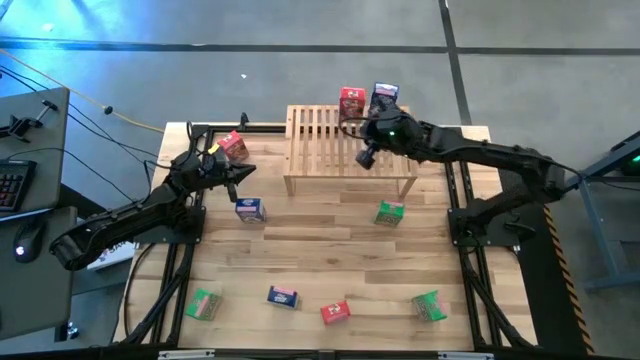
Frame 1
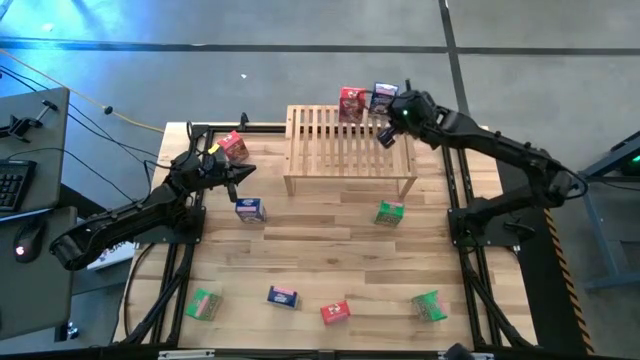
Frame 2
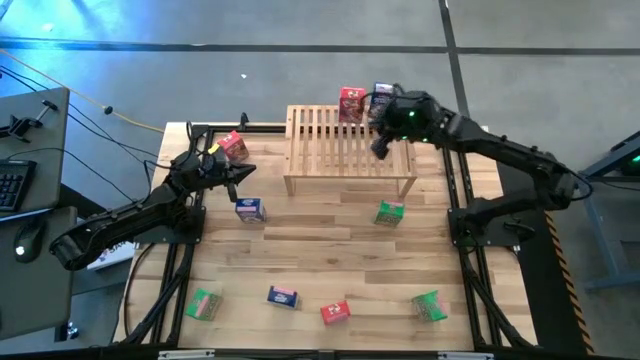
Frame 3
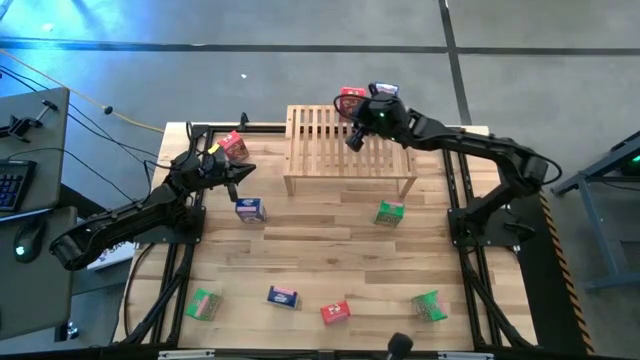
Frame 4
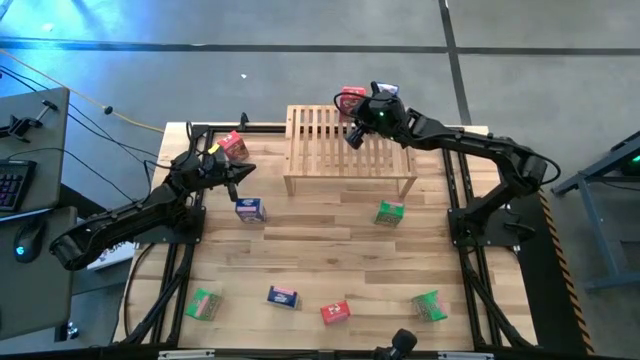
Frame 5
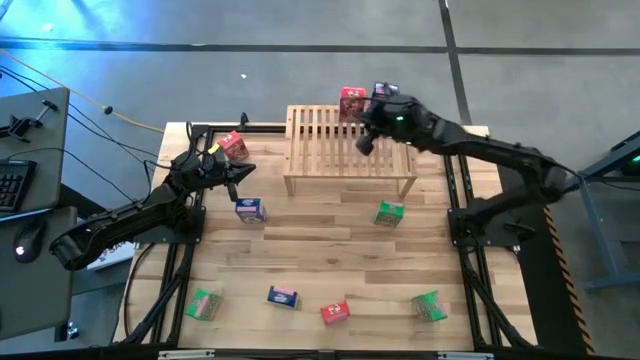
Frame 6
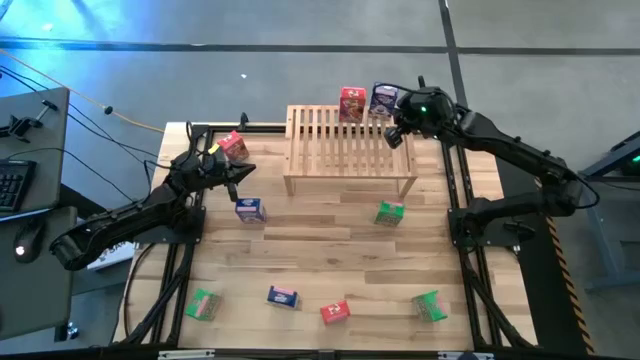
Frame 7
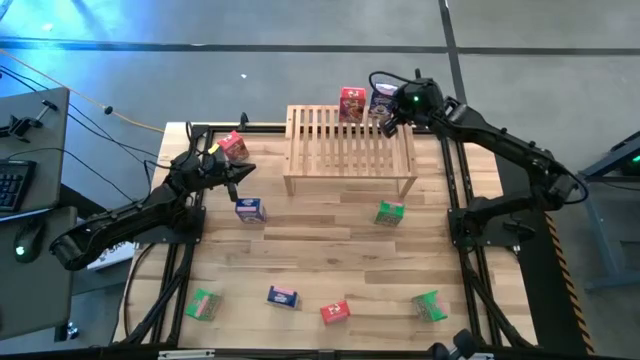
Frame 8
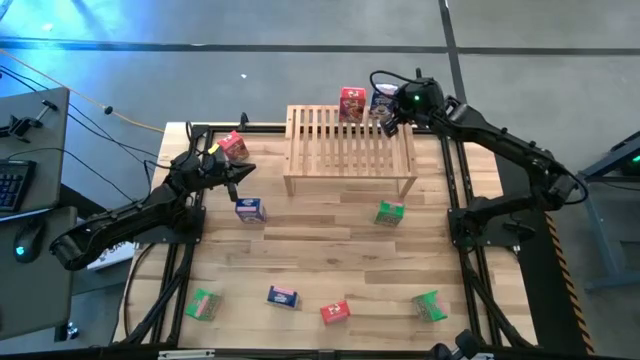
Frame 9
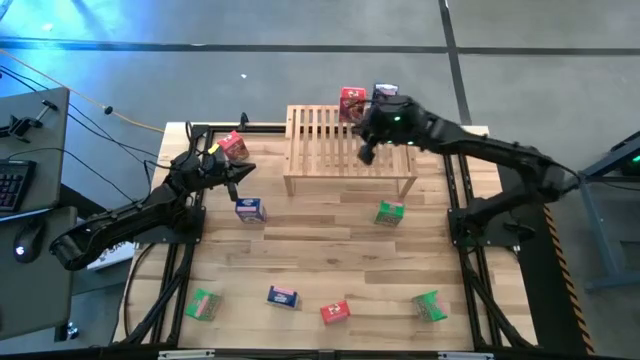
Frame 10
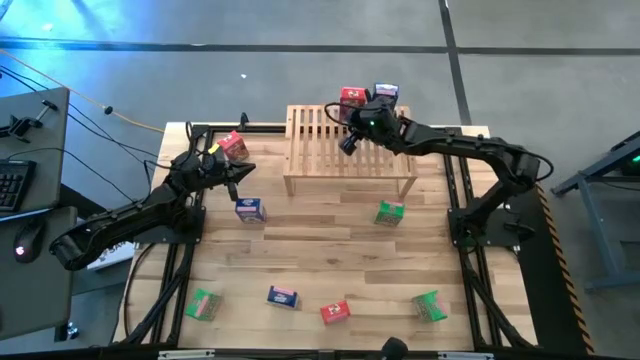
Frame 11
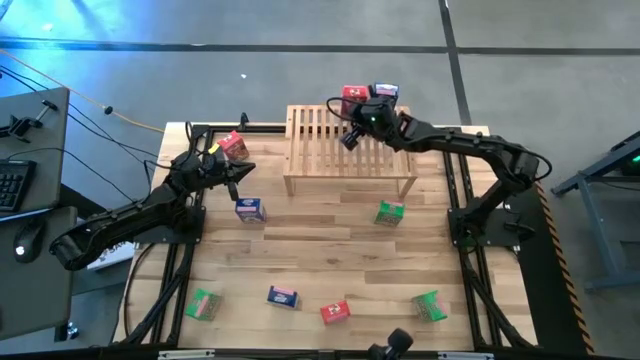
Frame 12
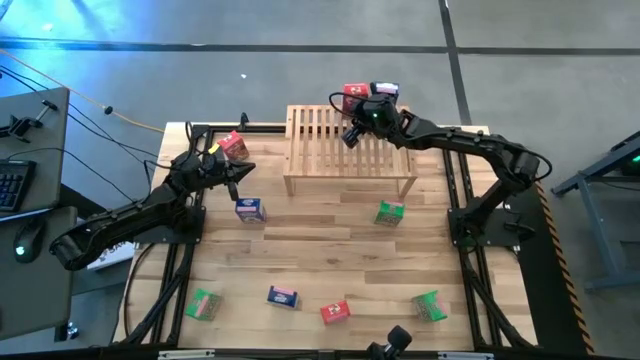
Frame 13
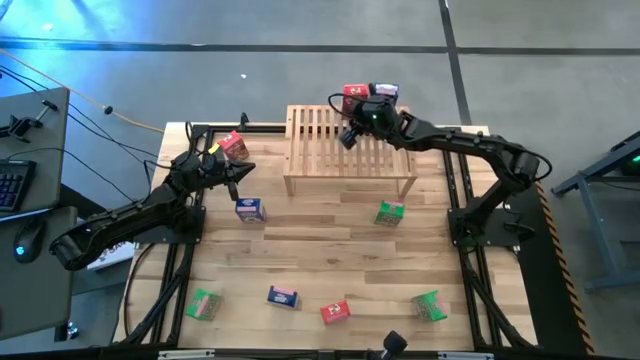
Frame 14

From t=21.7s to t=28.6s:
Task: Stack cereal on shelf
Adjust the cereal boxes on the shelf

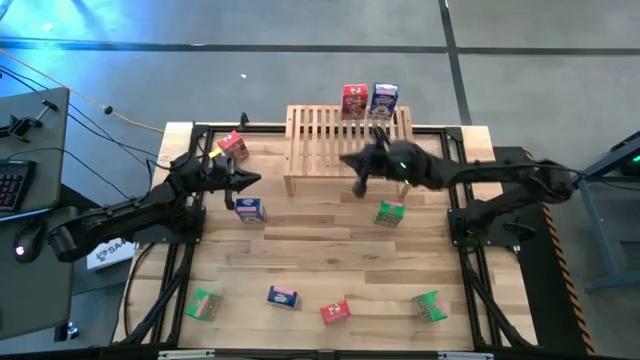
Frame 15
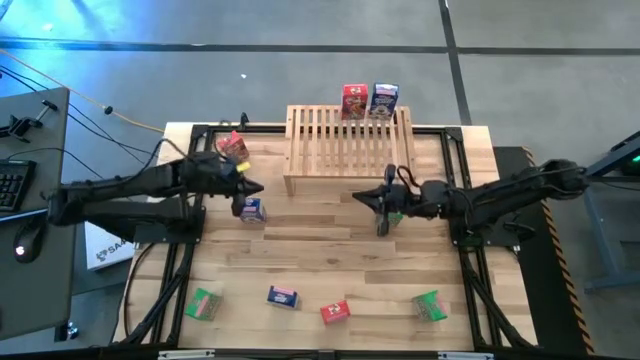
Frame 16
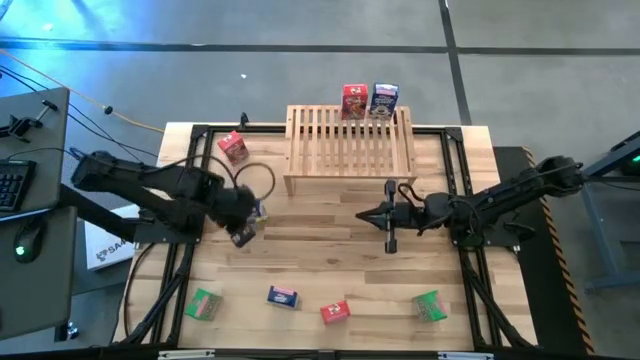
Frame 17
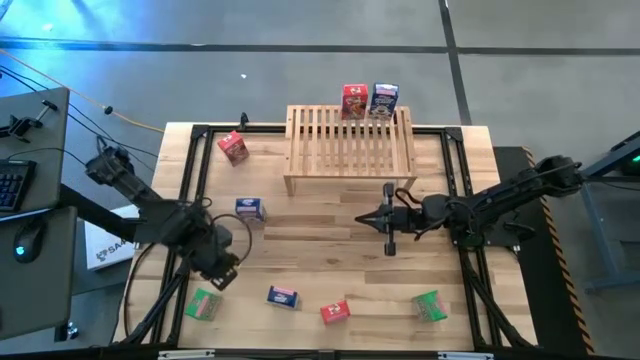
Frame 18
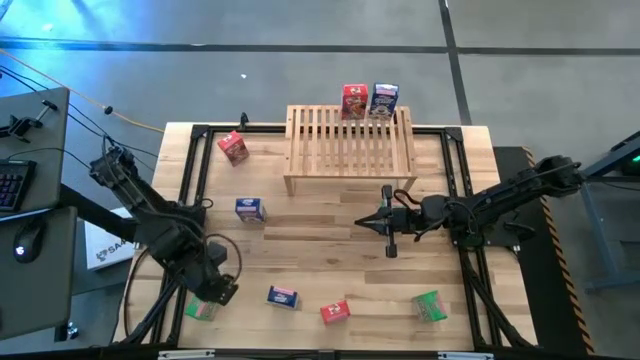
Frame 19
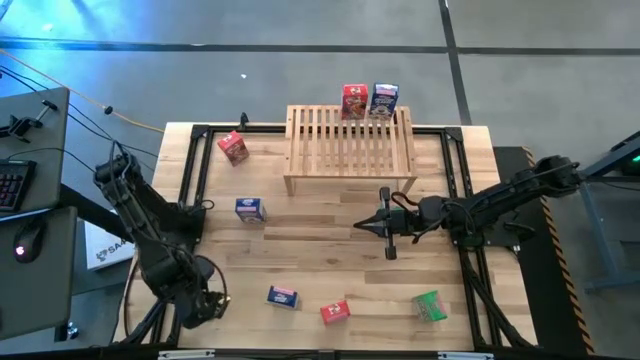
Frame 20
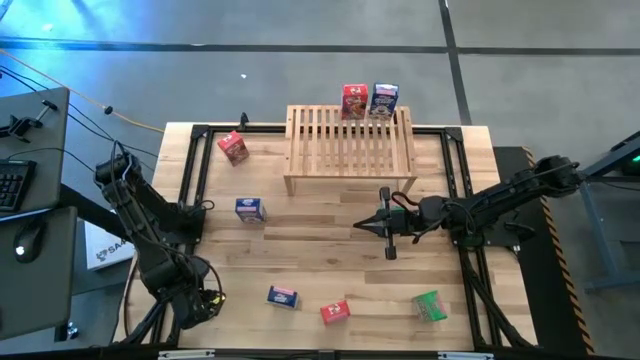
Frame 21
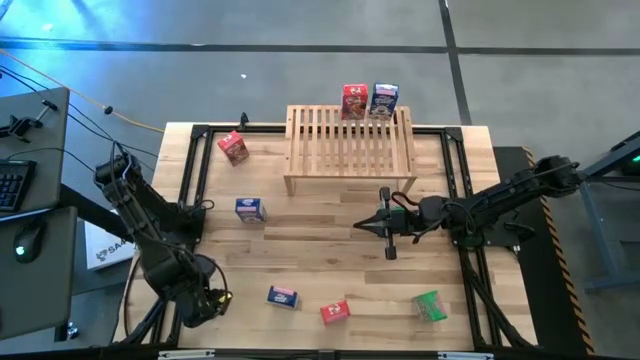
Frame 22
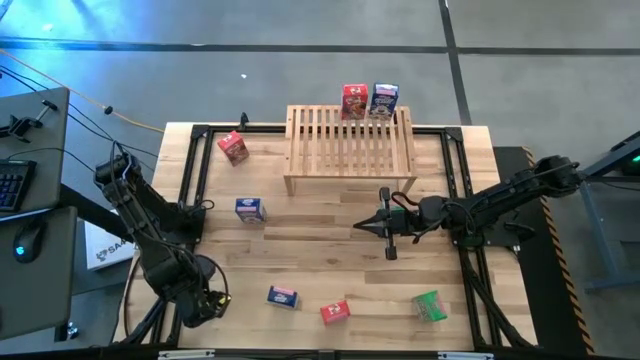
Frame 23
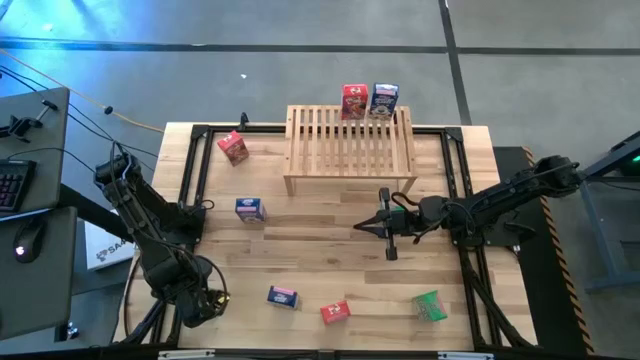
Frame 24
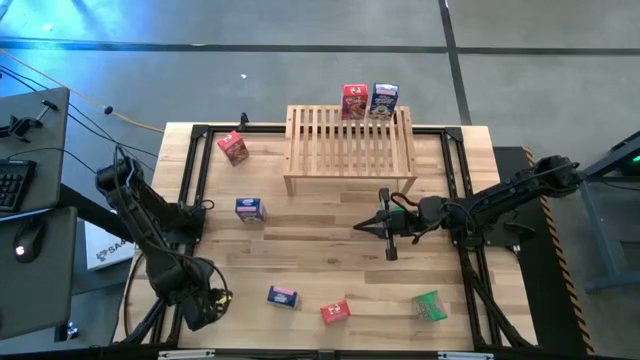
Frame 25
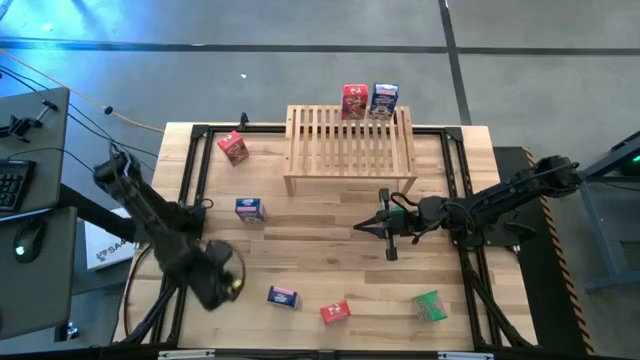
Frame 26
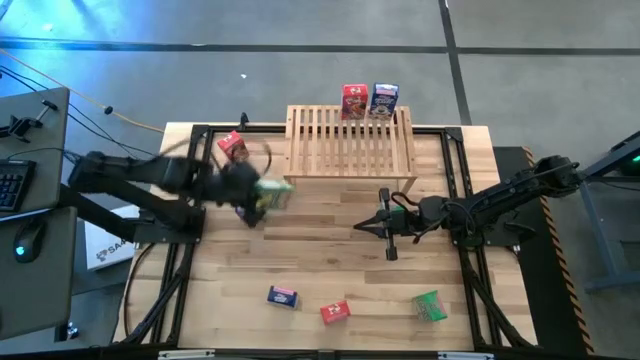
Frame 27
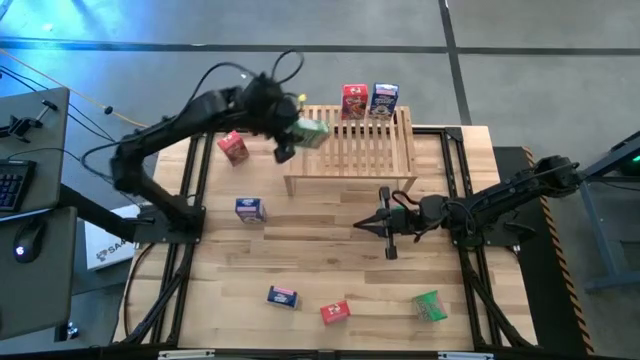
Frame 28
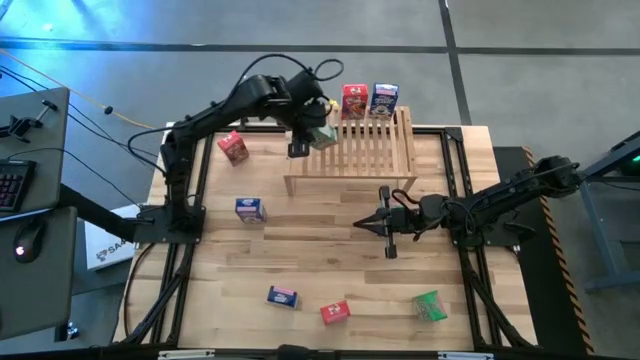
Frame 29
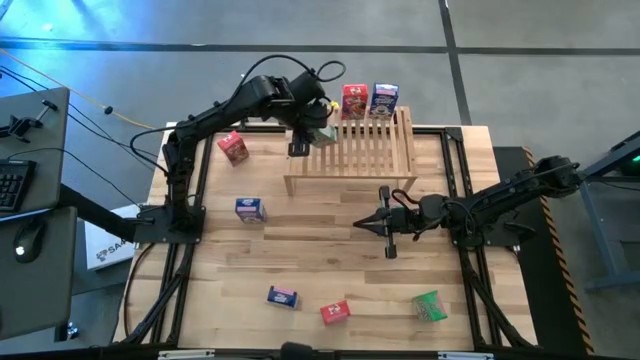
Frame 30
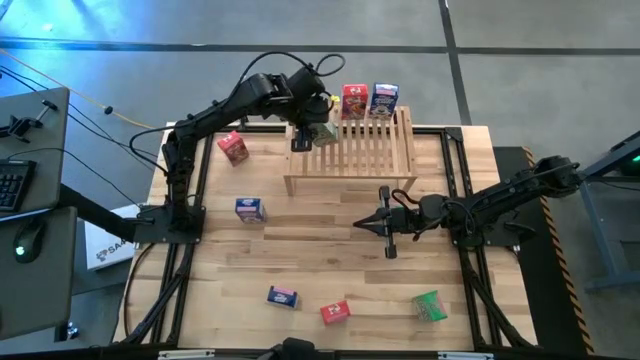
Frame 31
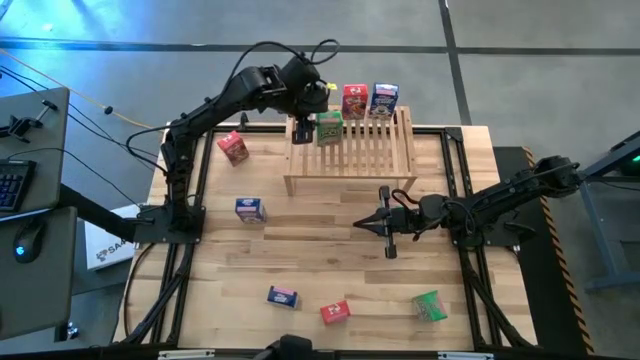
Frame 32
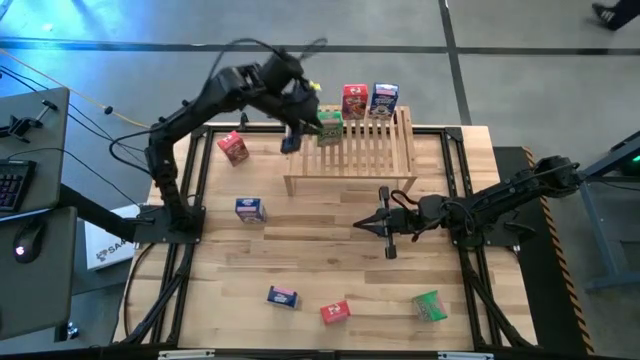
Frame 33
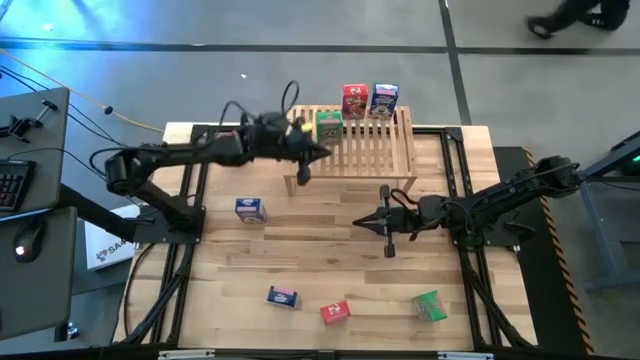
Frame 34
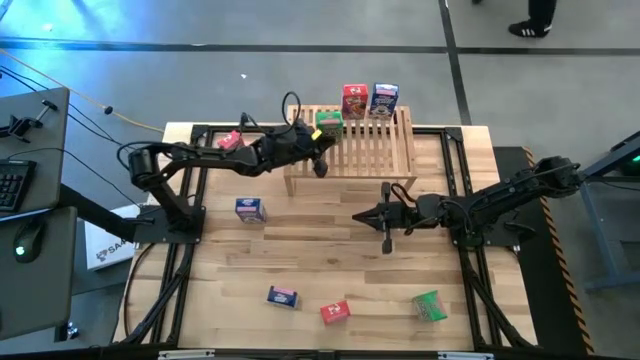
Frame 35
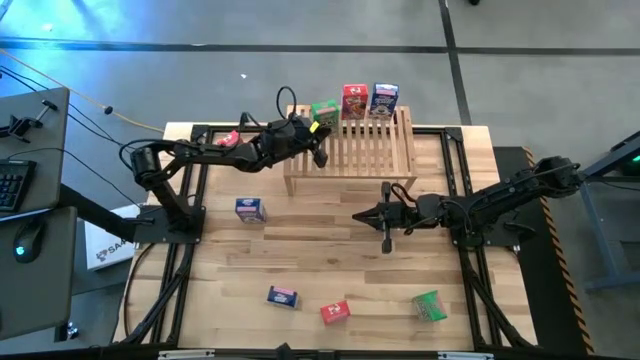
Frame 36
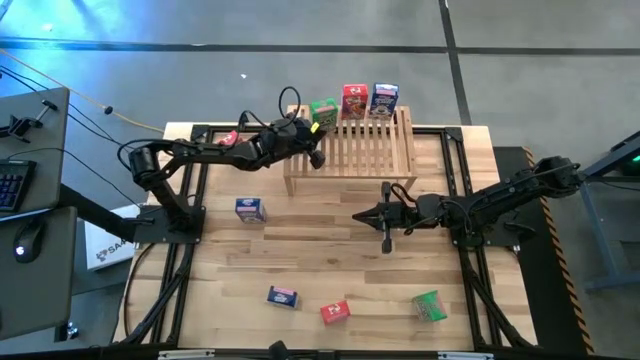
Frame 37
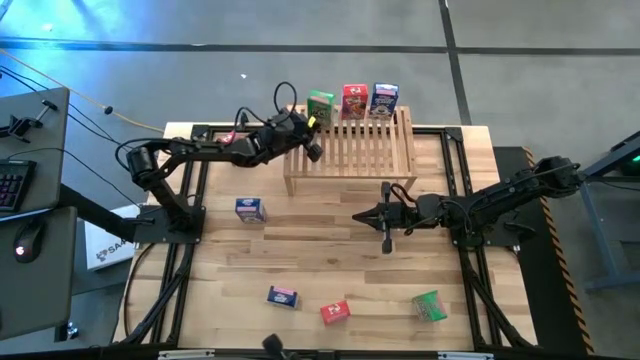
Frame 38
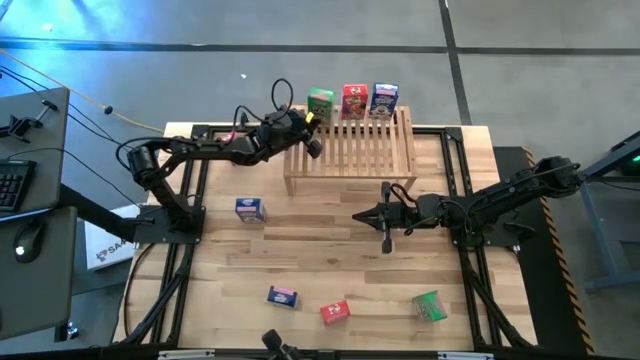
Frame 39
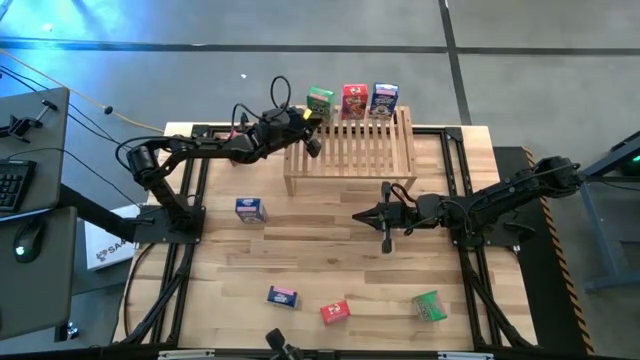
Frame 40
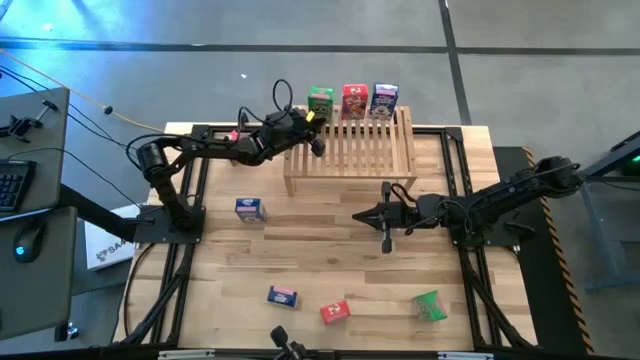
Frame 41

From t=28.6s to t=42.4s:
Put the bottom left green cereal box on the shelf

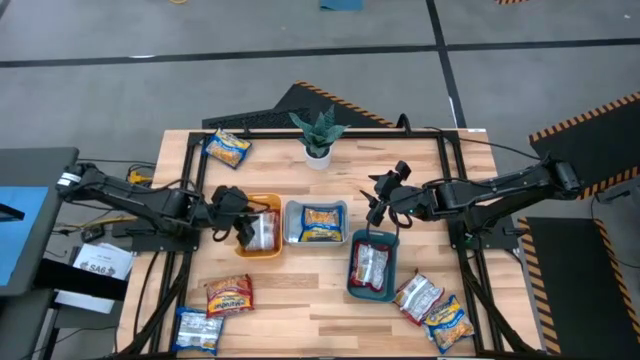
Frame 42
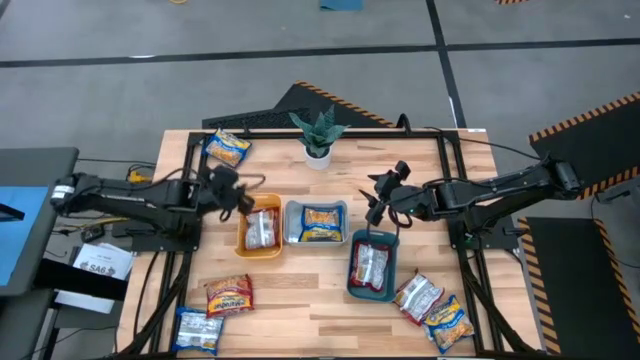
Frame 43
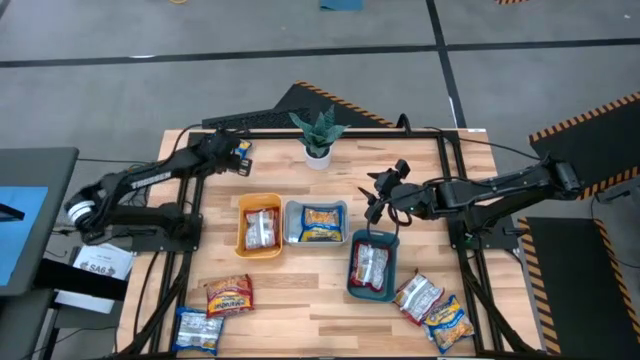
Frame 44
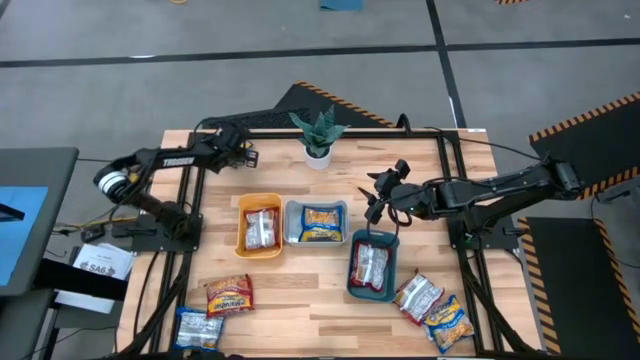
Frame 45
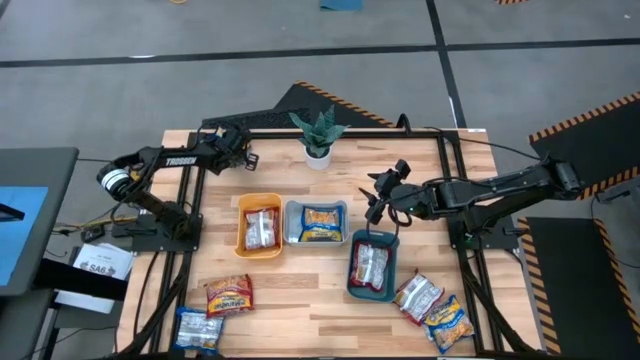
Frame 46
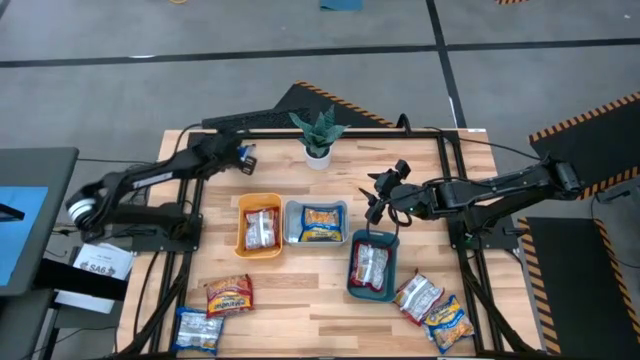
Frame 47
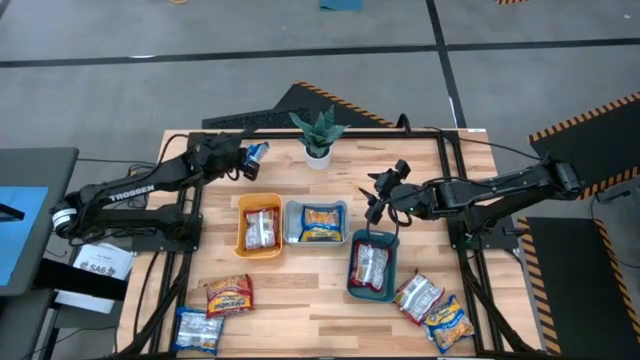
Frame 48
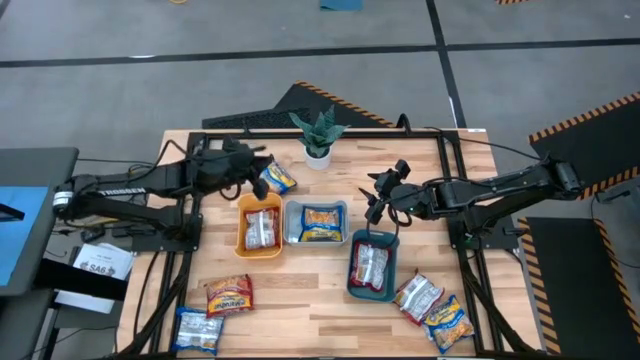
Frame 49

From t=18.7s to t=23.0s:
Task: Sort Maruchan noodles
Put the top left blue noodle pack into the gray bin
